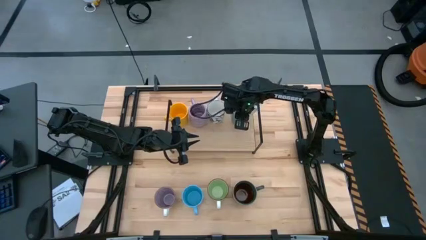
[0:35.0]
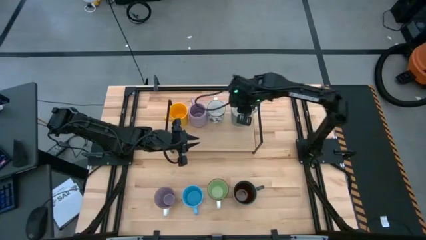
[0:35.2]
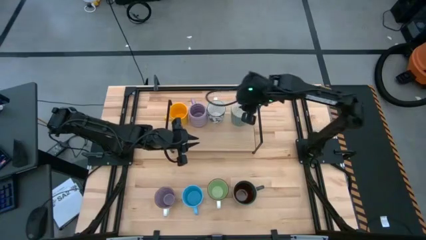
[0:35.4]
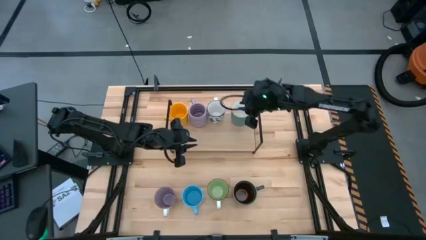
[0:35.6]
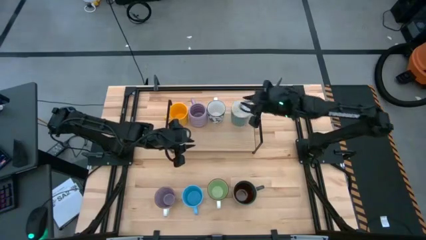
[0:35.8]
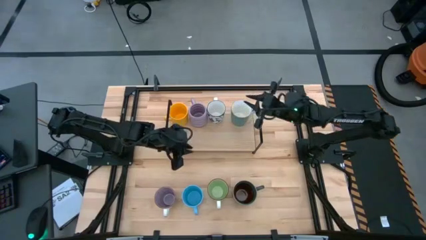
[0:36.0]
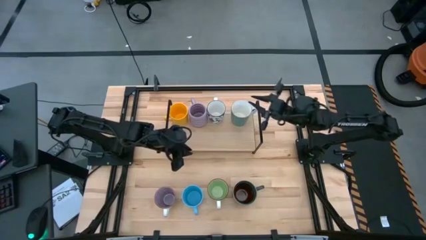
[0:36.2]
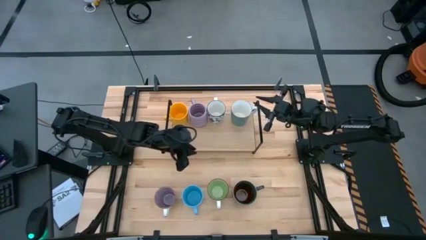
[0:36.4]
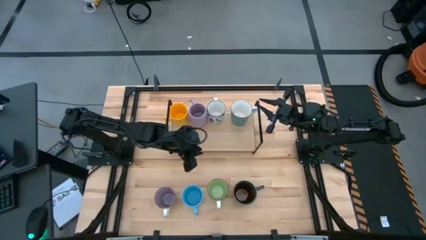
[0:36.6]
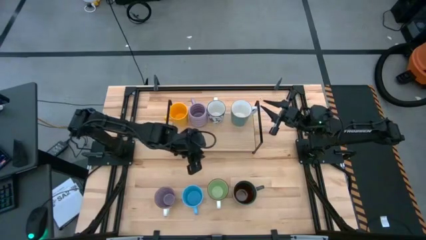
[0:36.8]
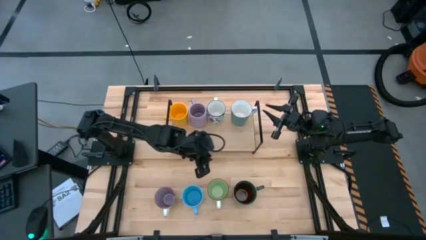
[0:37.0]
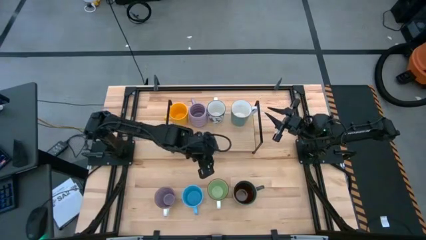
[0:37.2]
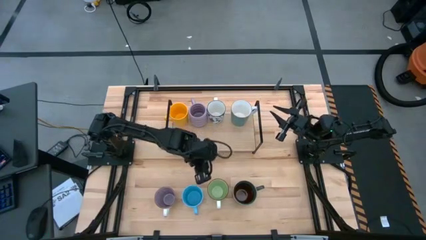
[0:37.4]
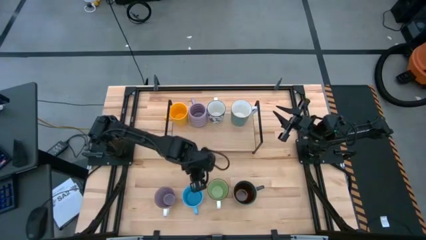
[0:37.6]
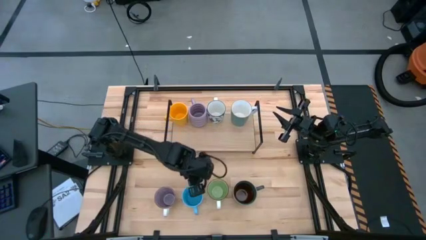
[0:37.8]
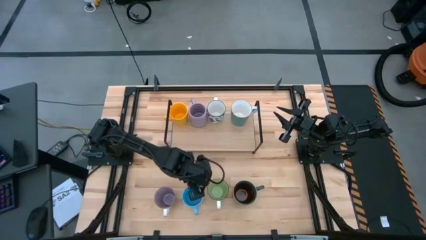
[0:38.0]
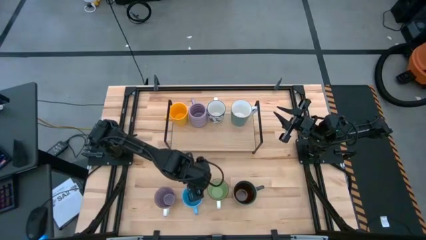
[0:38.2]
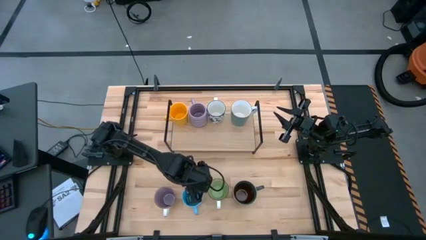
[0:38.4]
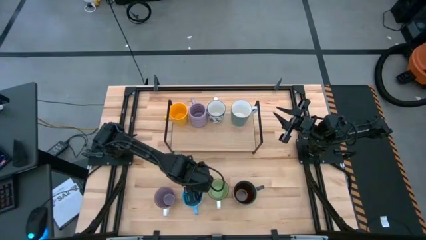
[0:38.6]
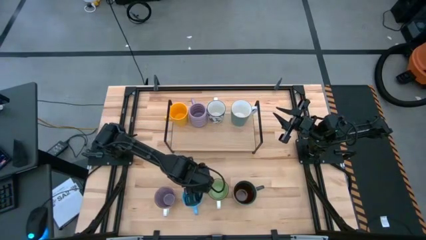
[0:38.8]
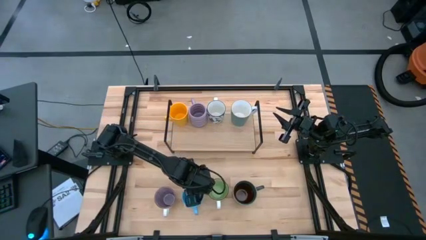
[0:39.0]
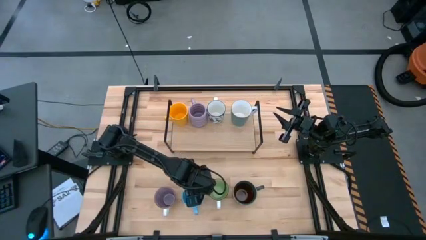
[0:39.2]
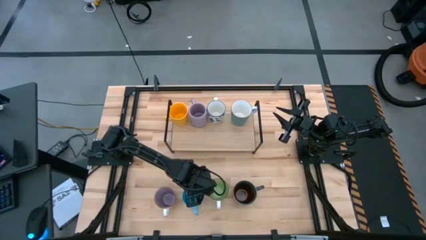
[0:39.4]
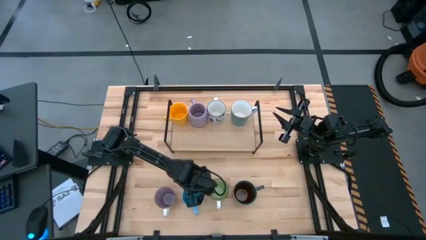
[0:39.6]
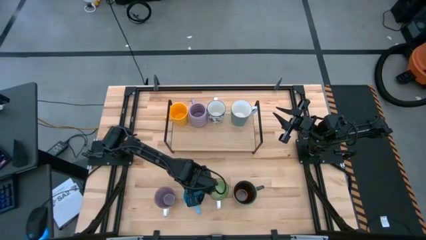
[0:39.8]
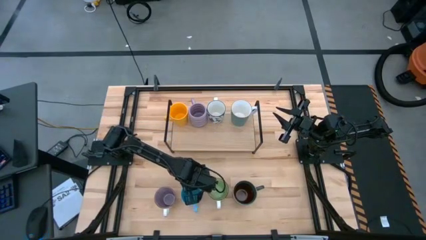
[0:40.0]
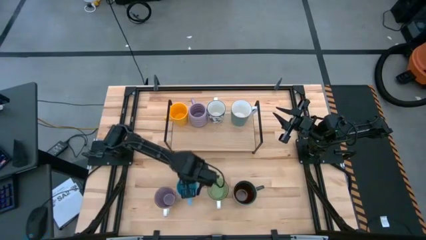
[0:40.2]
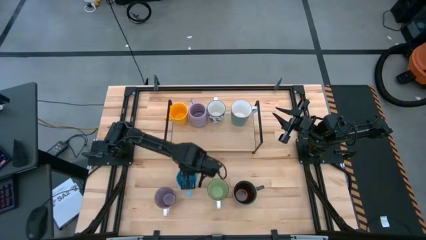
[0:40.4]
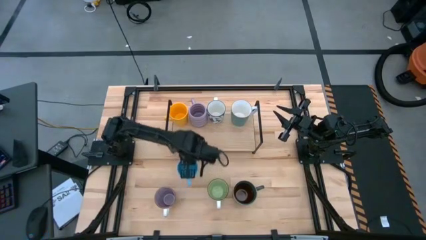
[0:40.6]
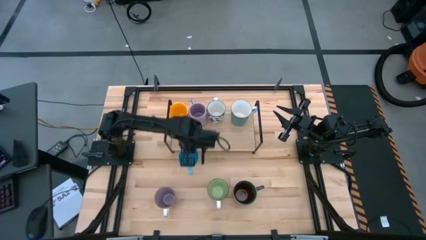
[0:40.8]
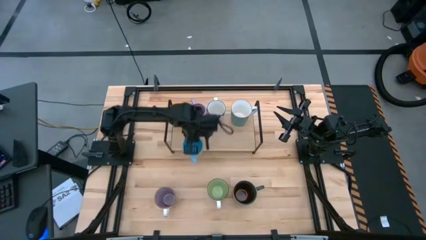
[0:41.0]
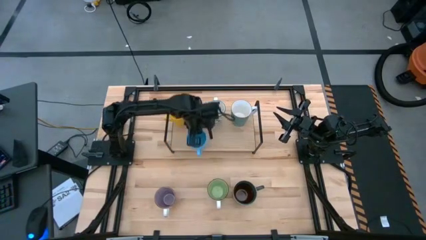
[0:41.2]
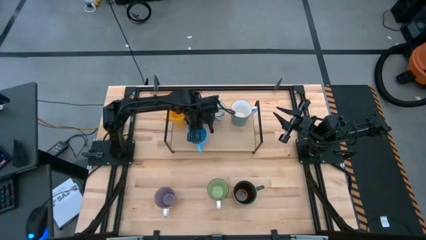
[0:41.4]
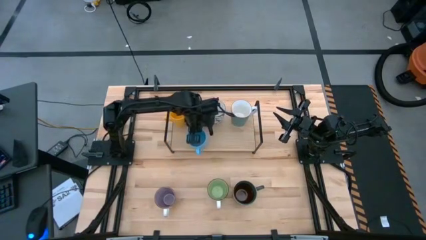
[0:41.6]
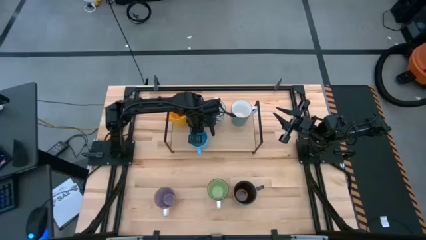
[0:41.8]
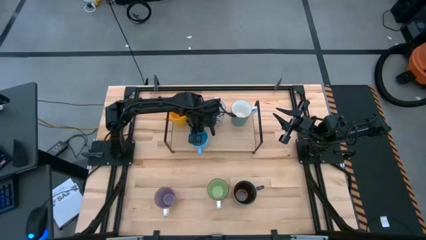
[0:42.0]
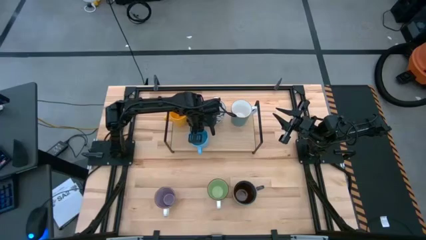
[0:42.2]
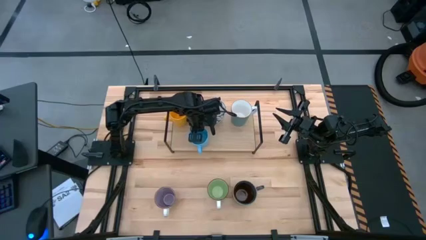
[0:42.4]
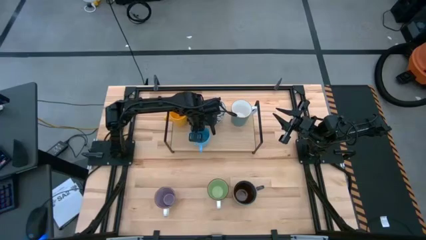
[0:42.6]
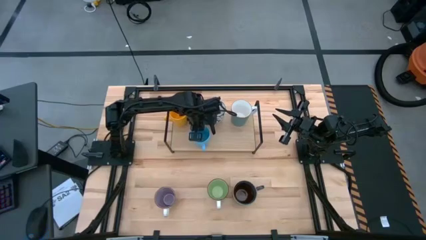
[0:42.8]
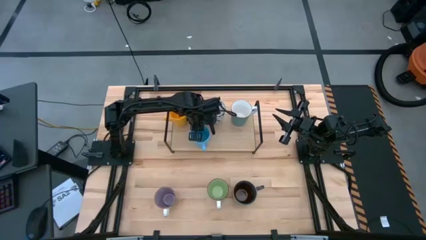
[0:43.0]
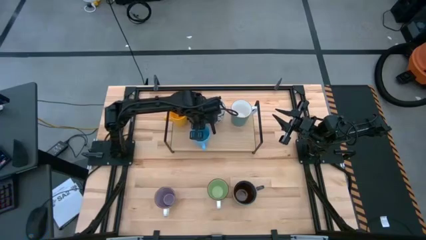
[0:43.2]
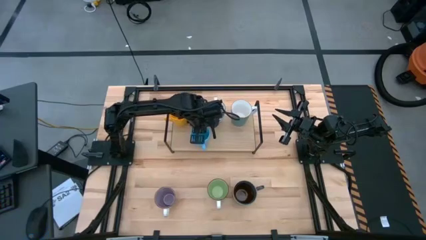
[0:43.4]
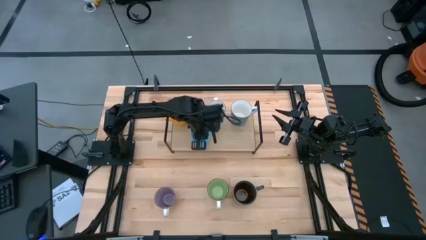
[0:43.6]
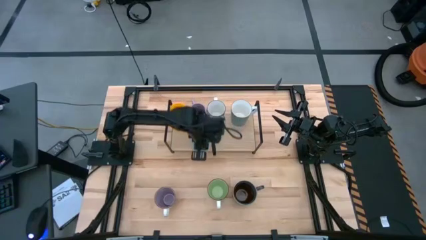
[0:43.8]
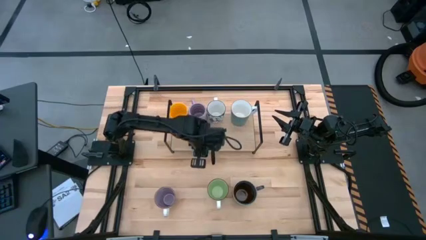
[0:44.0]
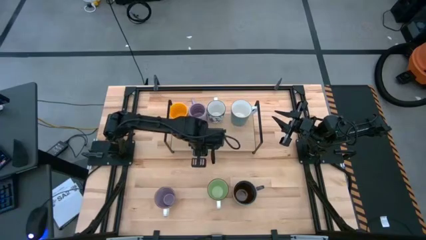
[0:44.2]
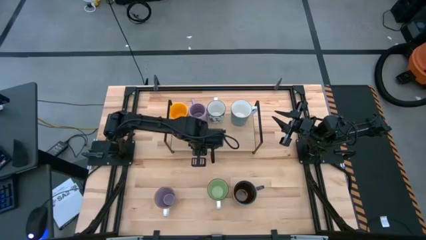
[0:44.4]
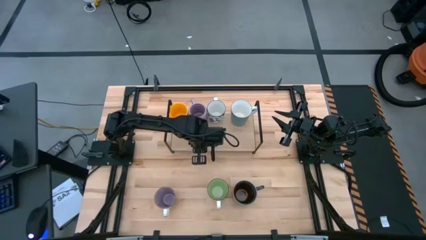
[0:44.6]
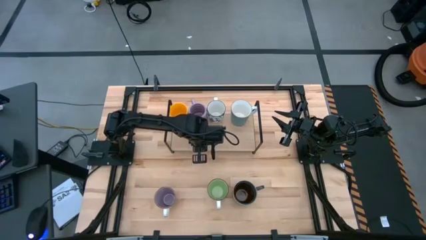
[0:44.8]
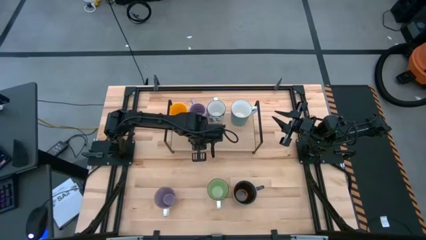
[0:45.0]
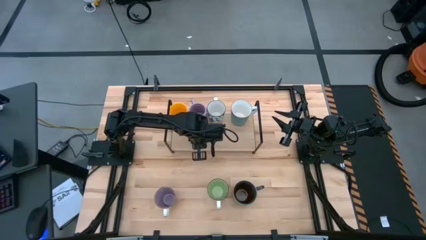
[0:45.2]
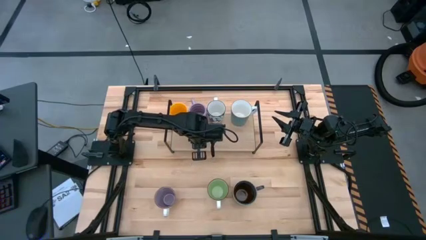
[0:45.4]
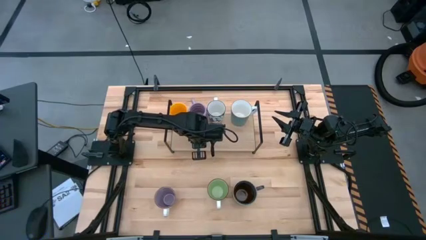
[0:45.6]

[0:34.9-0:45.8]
Task: Place coffee mugs
Put the blue mug on the shelf

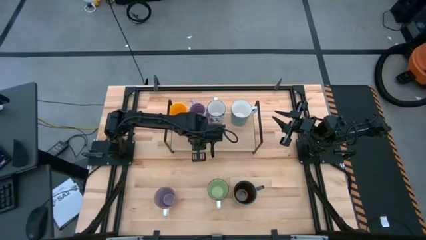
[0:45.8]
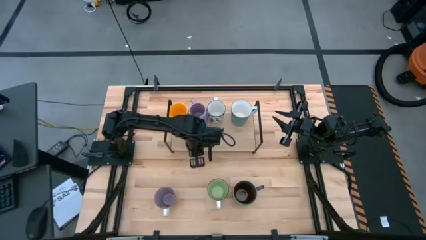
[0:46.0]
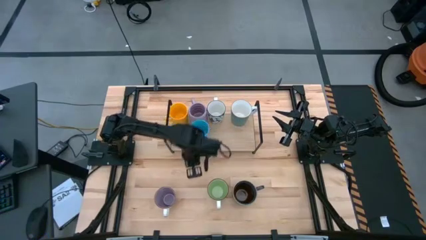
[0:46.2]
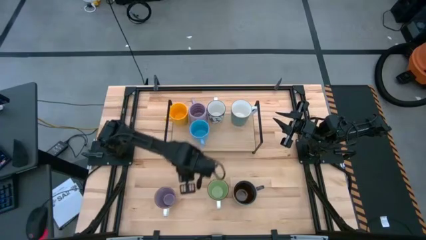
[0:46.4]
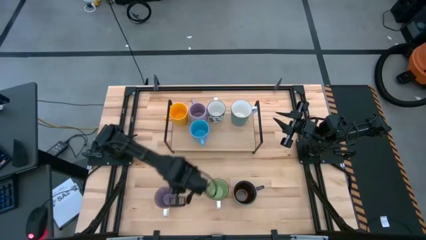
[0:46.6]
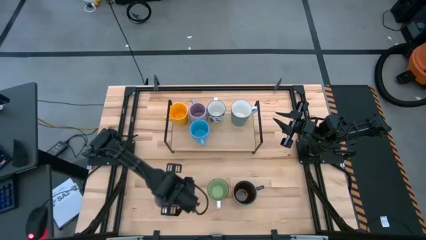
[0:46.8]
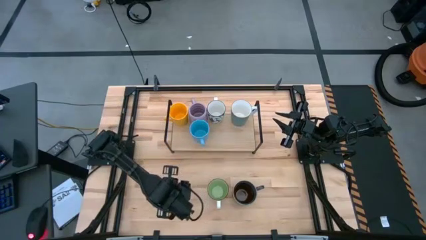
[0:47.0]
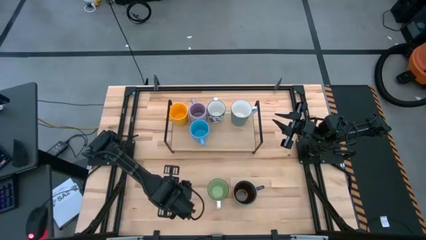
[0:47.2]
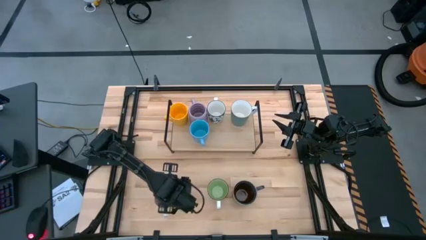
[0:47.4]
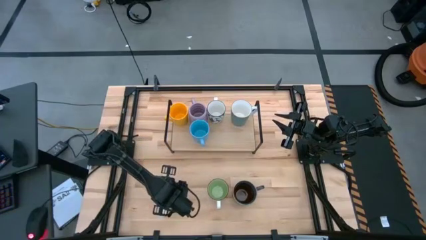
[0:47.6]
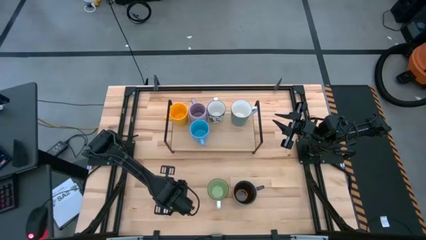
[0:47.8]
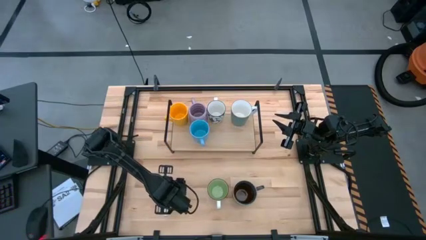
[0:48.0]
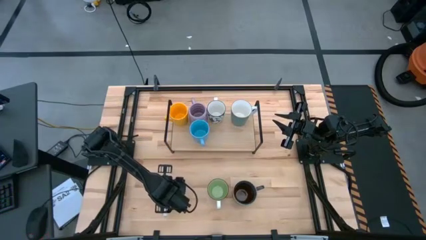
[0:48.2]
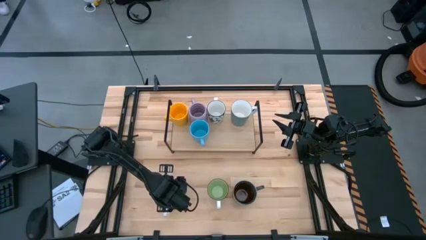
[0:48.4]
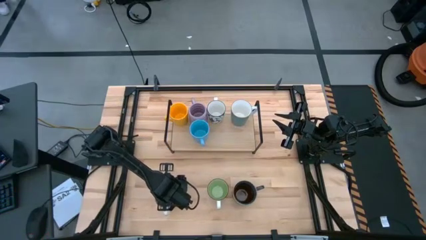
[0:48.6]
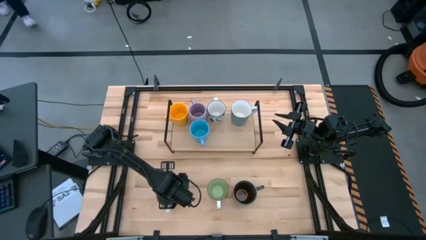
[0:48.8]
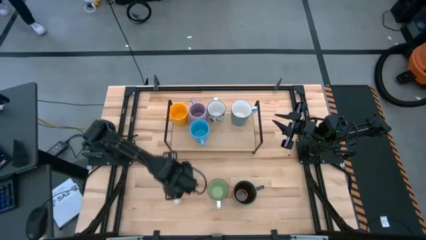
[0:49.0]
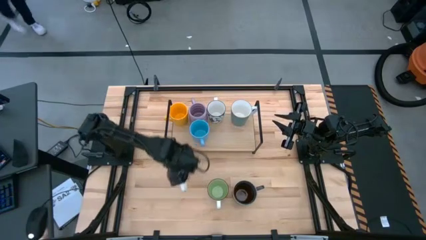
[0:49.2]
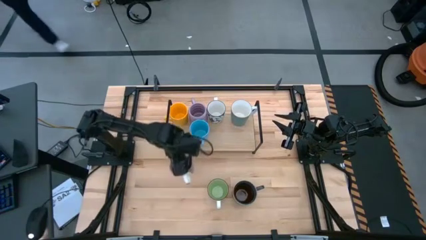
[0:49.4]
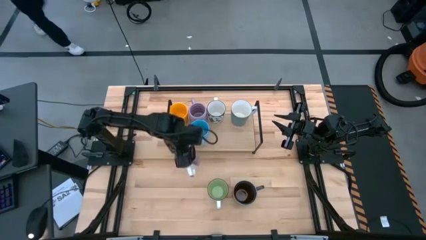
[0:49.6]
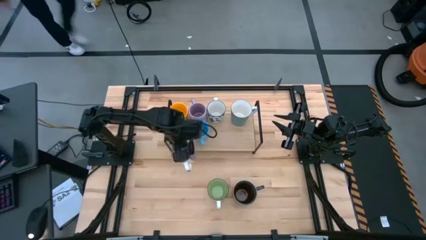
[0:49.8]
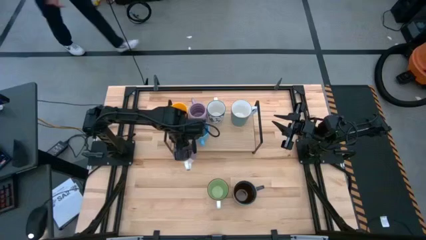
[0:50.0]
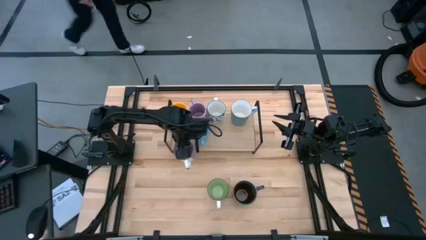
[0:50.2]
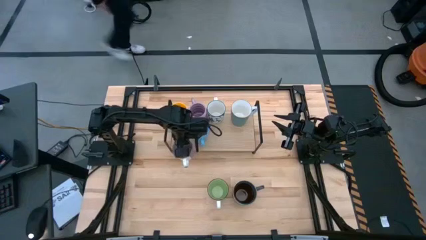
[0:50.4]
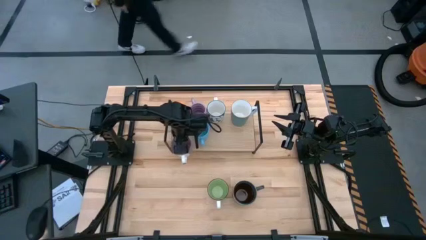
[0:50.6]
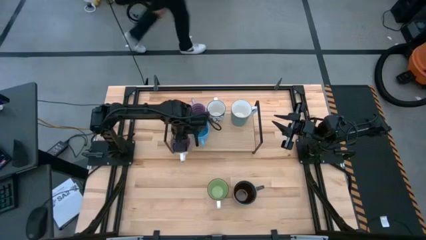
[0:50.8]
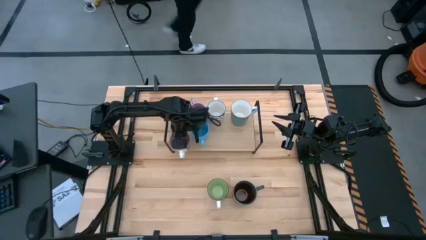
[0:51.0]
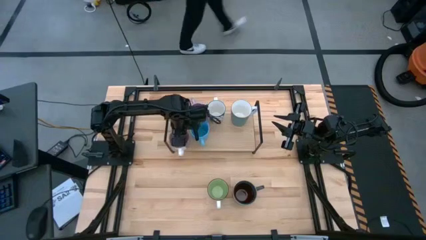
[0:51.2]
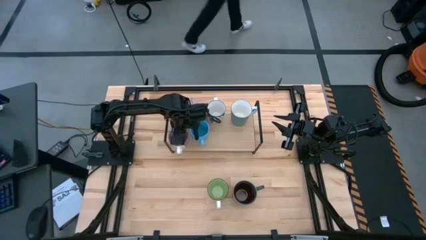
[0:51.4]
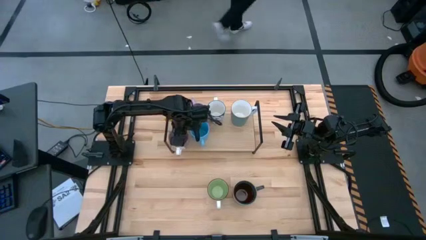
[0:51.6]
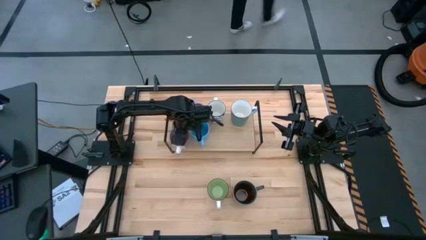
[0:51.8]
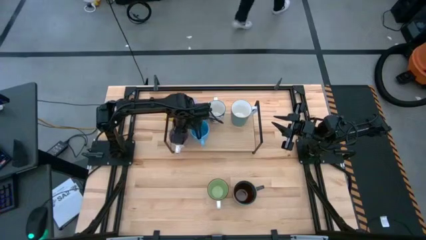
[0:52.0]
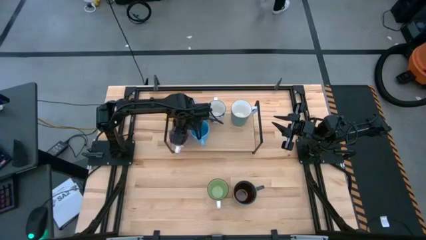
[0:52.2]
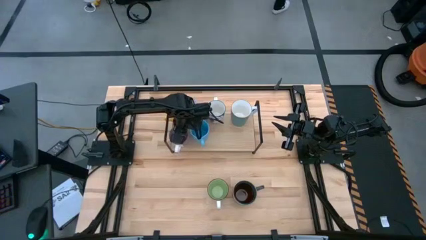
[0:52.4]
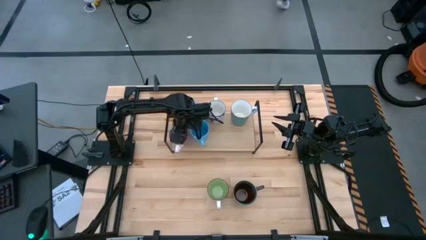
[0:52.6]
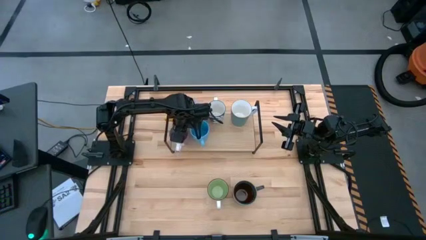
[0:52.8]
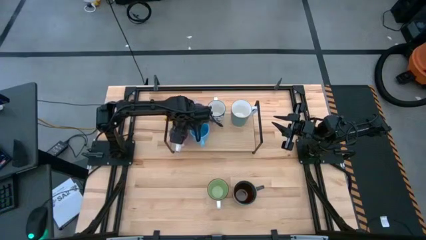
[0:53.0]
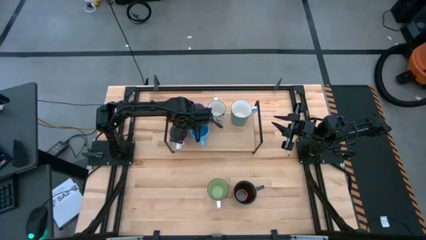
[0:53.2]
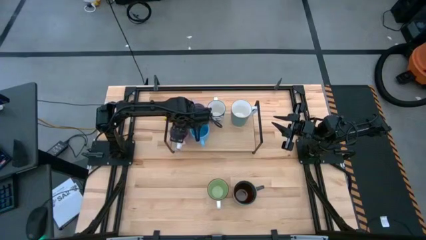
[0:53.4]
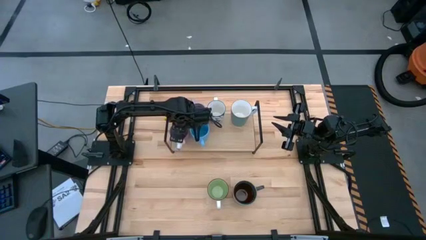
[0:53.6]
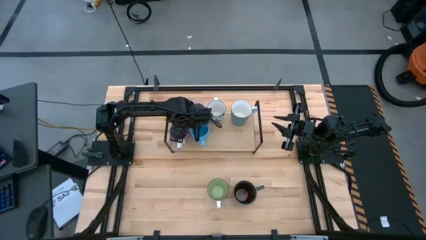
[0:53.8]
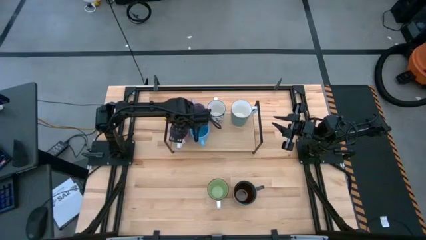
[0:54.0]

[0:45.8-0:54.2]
Put the purple mug on the shelf
